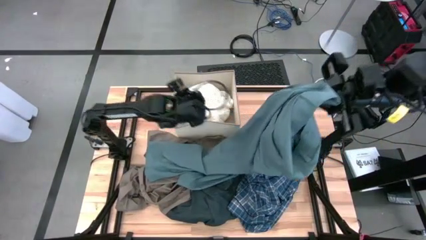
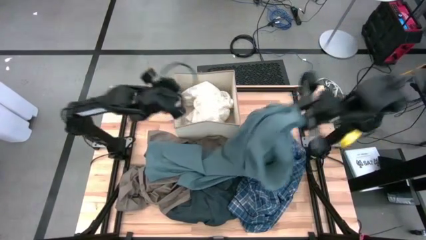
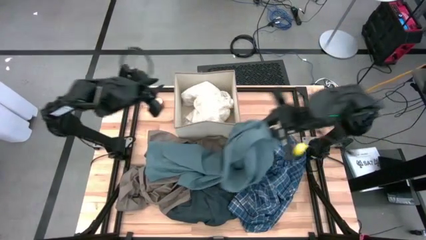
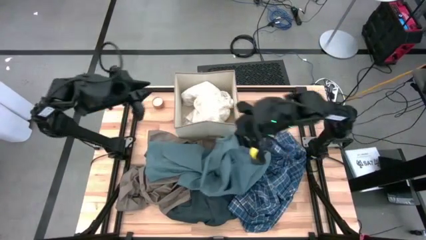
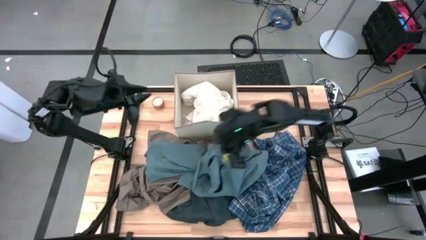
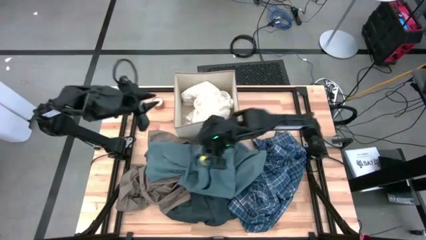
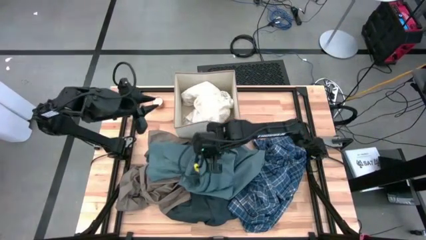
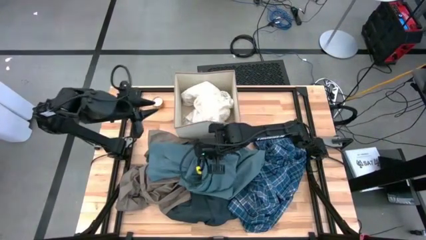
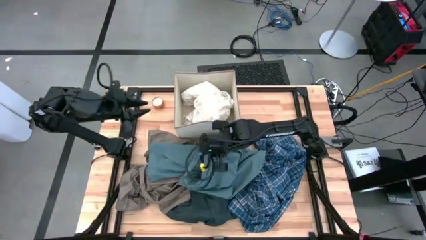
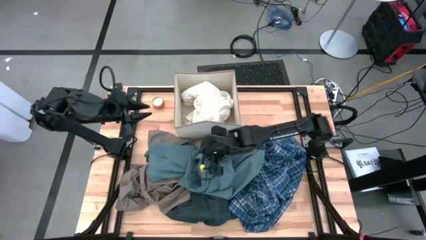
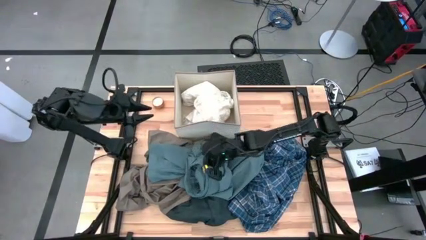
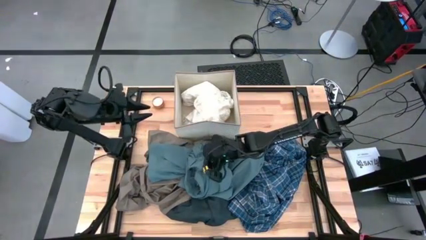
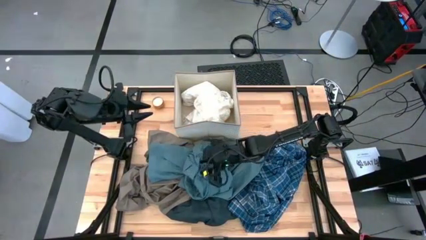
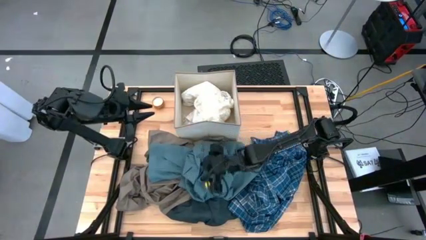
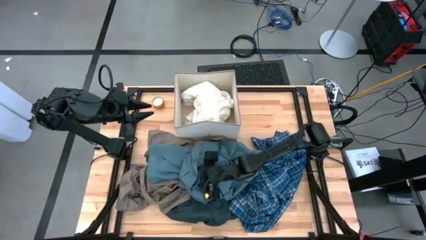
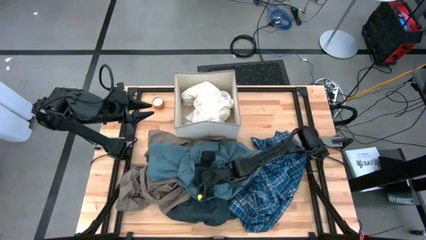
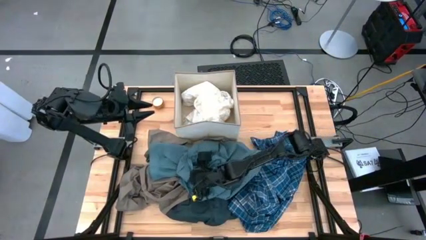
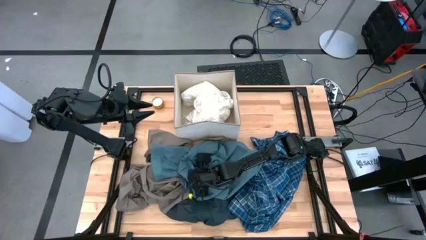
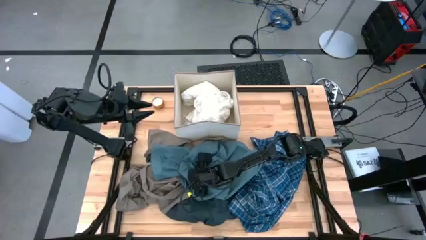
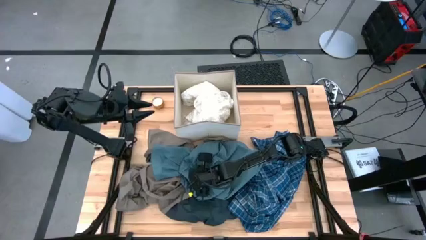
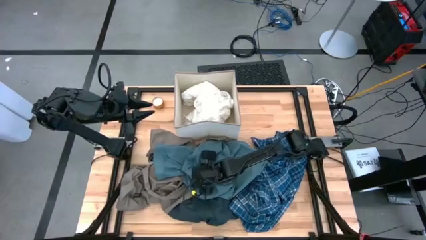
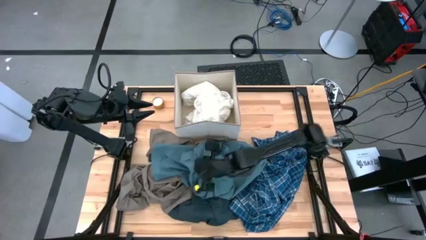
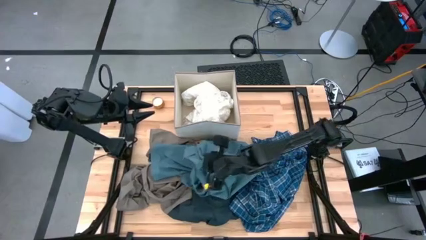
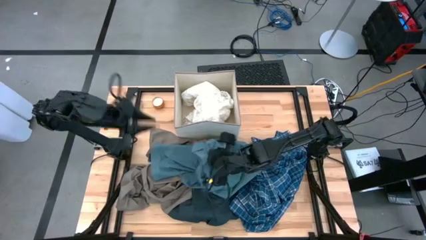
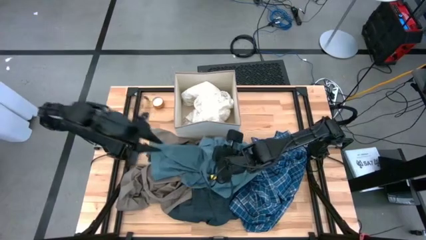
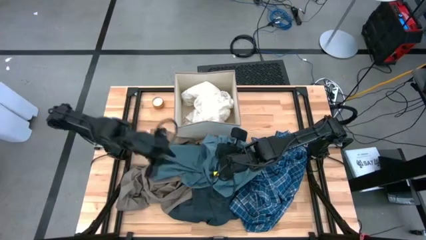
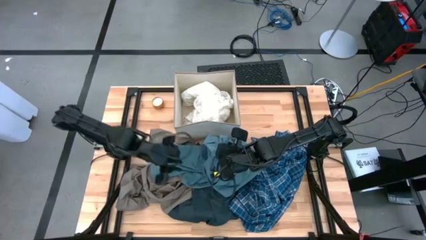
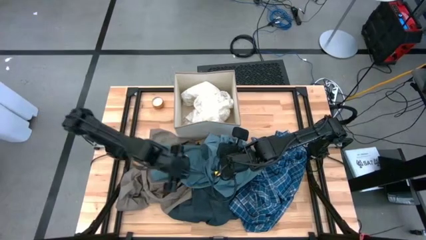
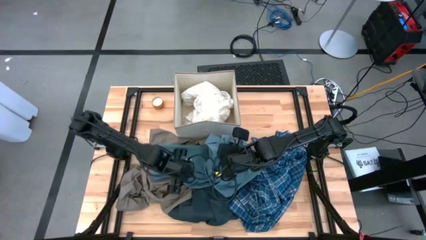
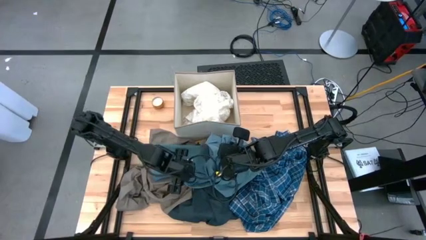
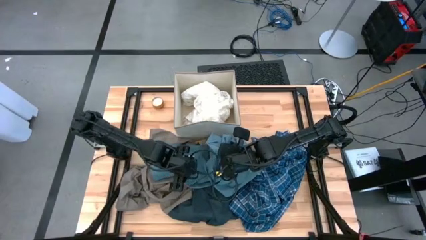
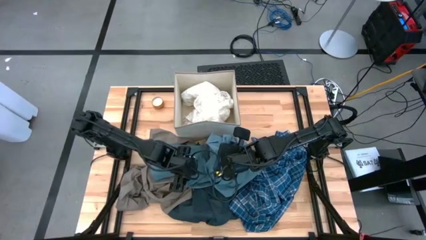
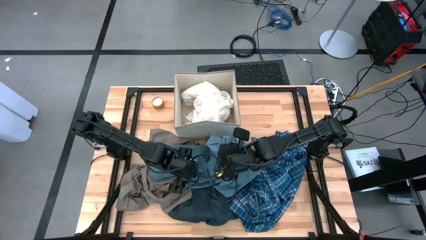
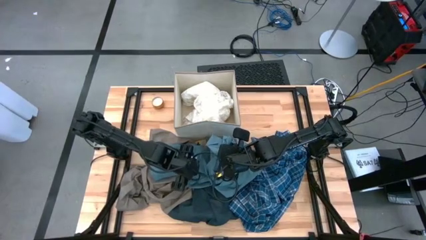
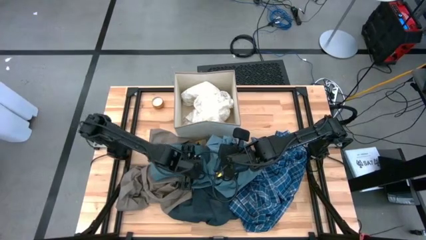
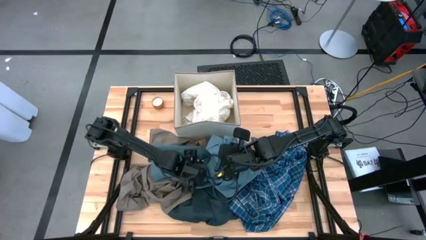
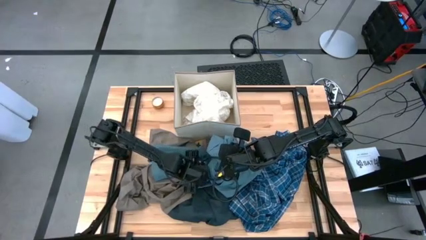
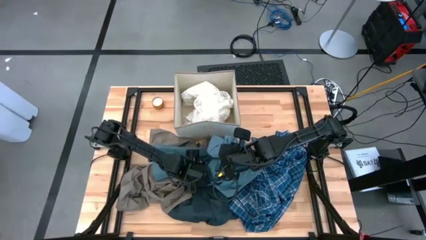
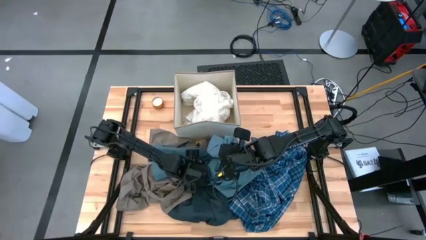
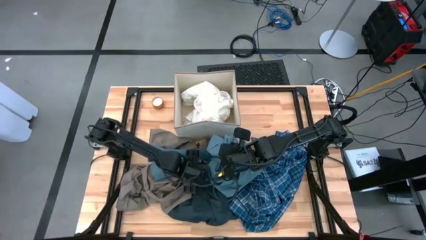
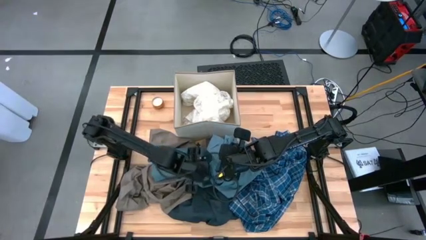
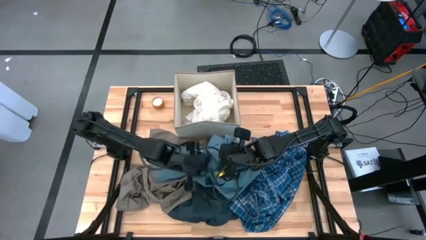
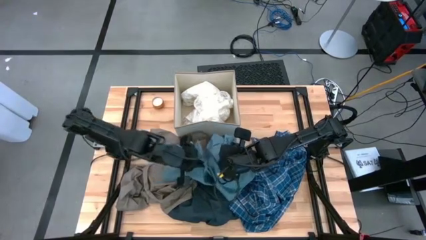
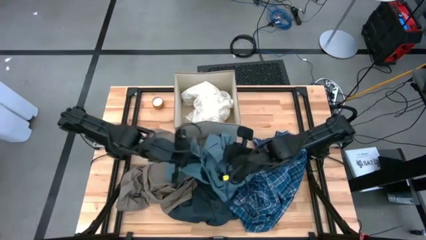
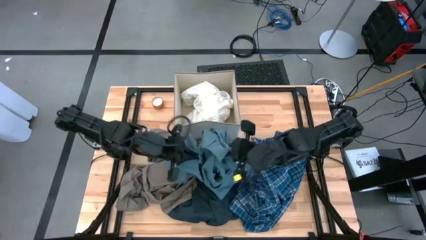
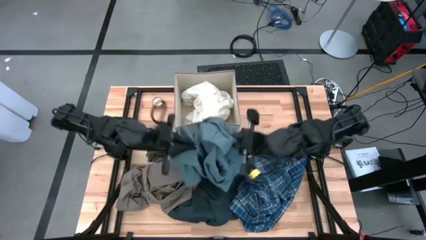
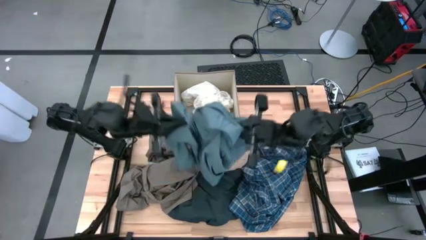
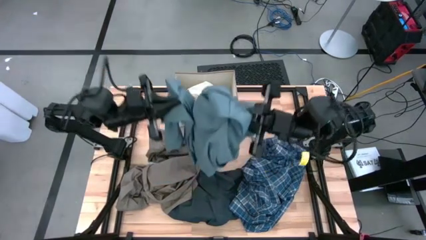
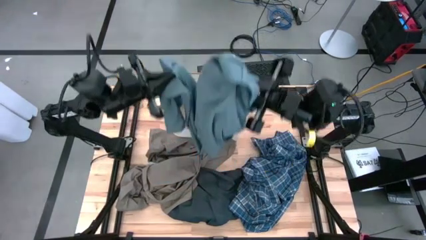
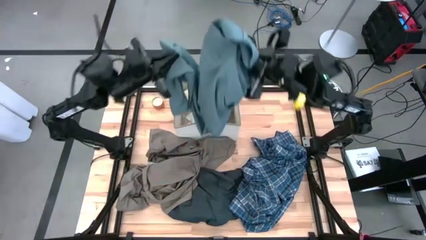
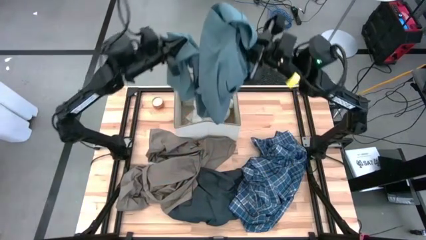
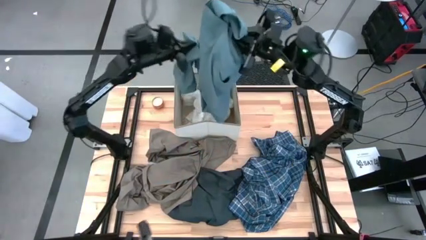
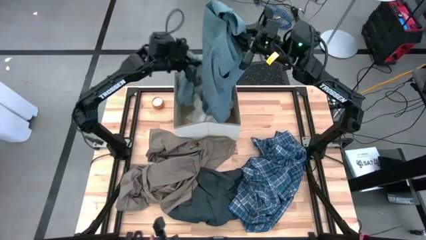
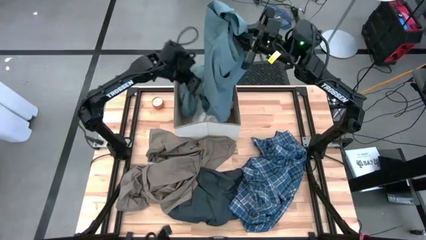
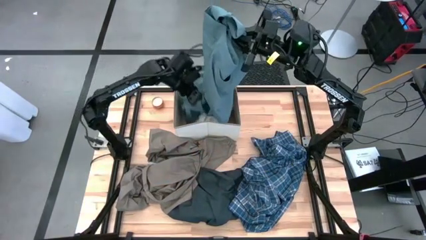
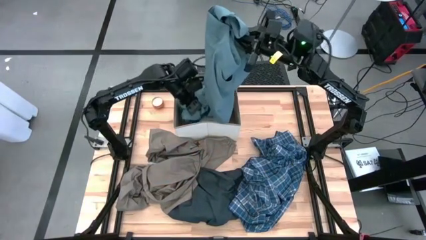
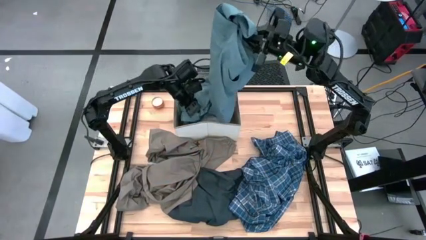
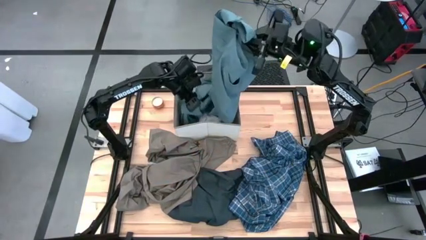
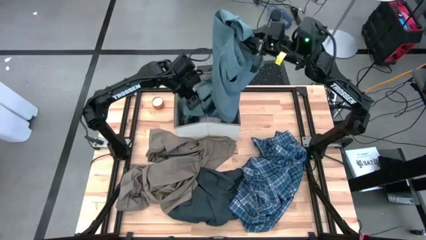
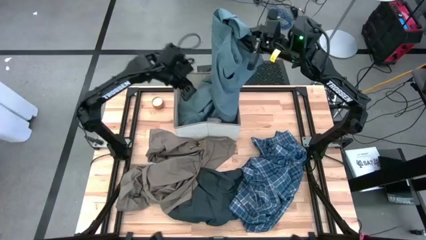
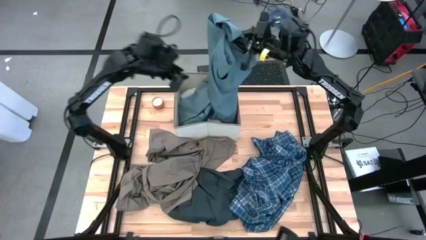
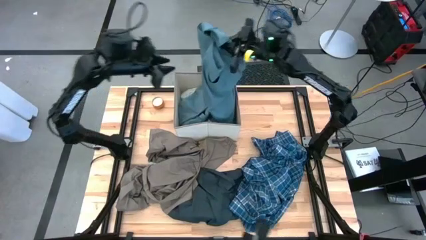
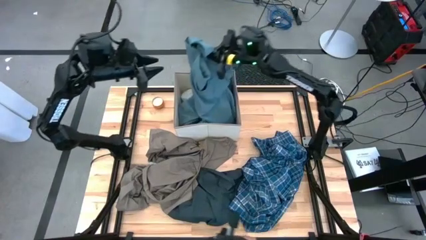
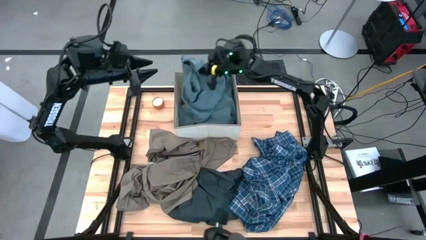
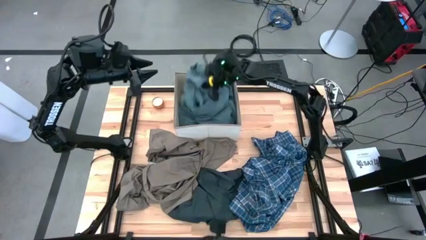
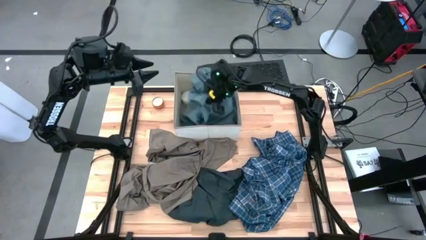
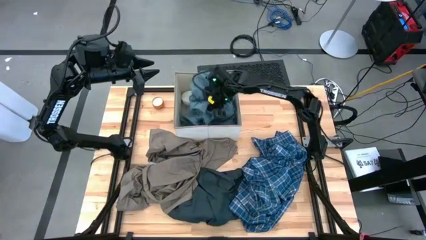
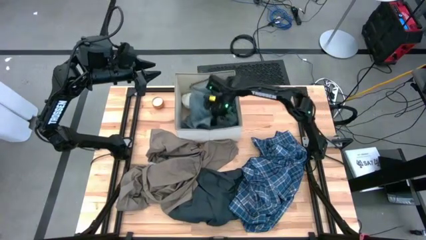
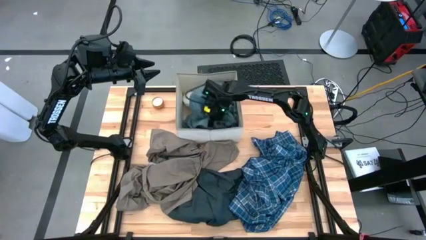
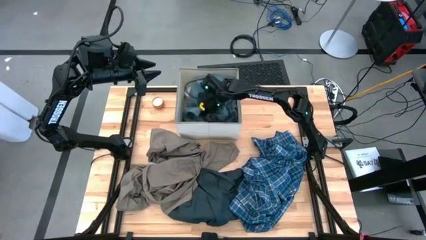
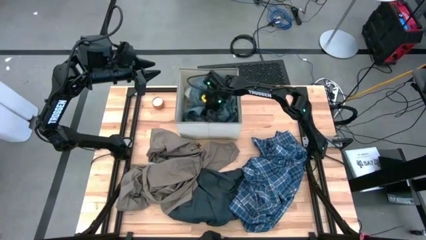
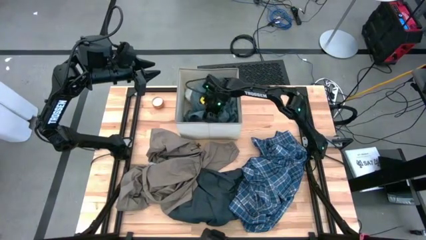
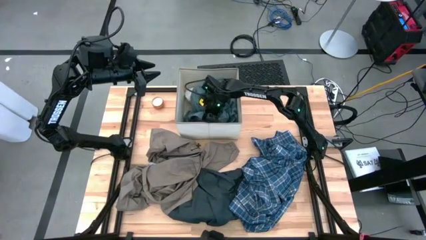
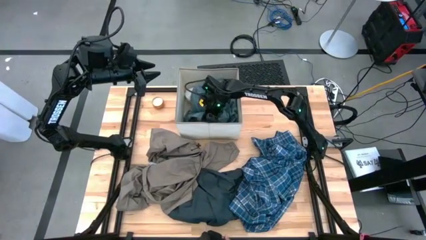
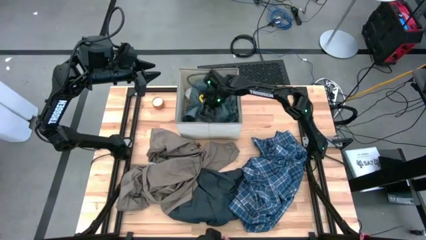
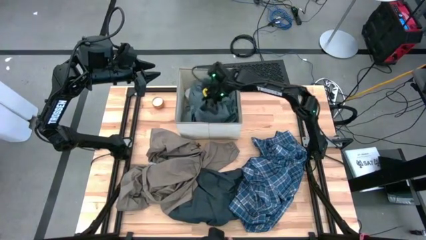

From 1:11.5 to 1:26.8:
Task: Sort clothes
Put the green pants into the laundry bin
